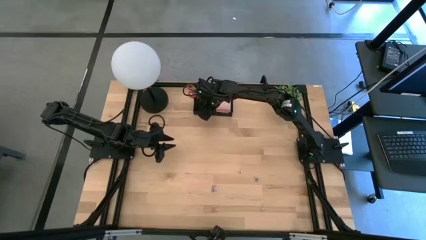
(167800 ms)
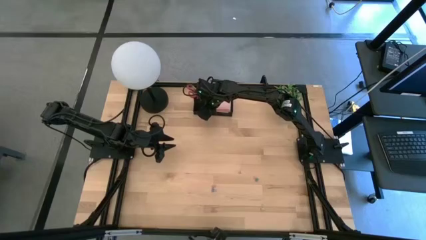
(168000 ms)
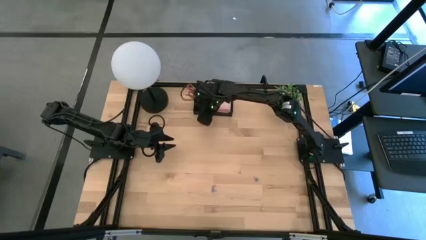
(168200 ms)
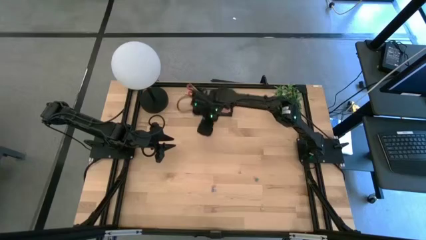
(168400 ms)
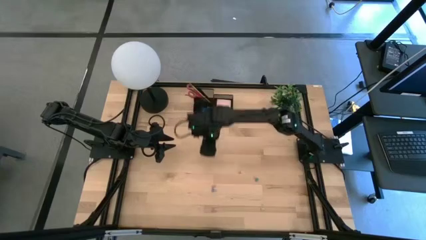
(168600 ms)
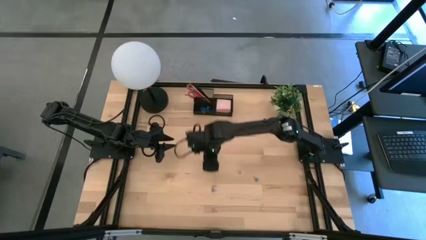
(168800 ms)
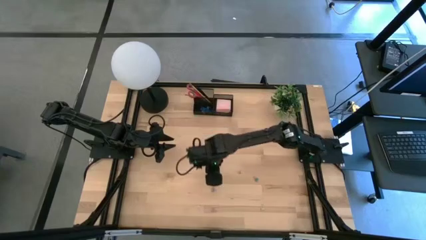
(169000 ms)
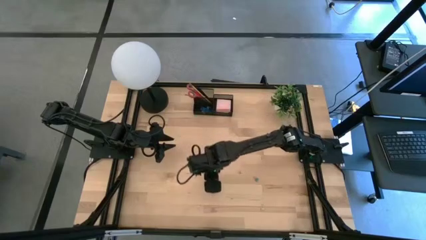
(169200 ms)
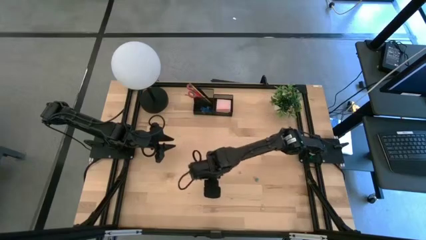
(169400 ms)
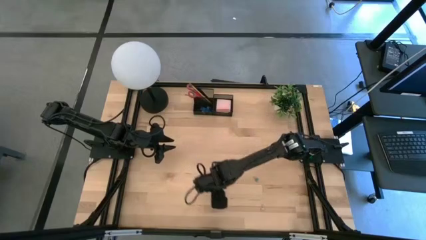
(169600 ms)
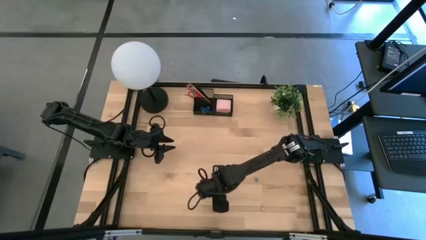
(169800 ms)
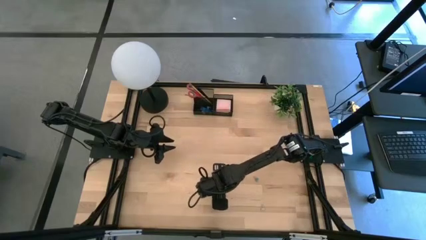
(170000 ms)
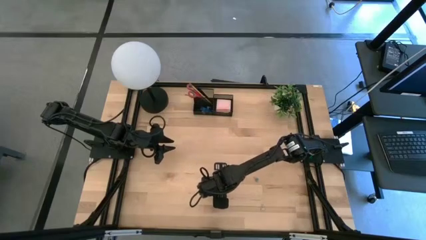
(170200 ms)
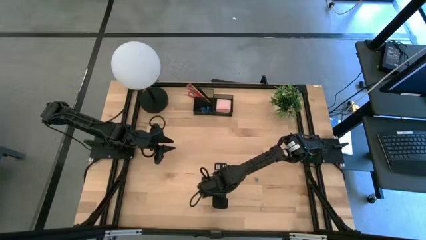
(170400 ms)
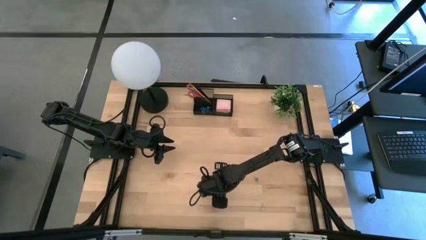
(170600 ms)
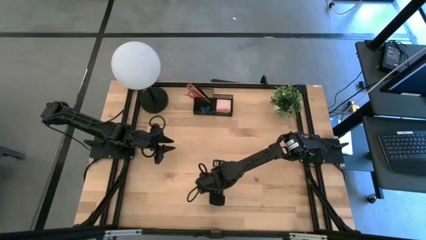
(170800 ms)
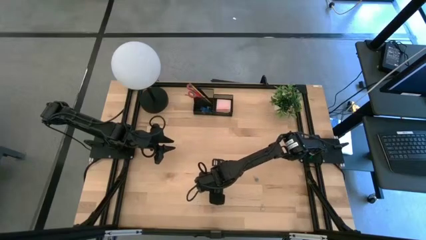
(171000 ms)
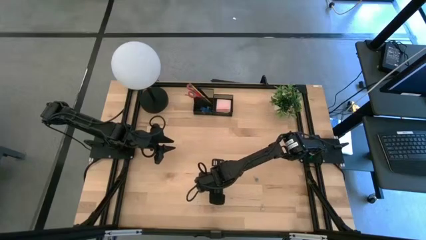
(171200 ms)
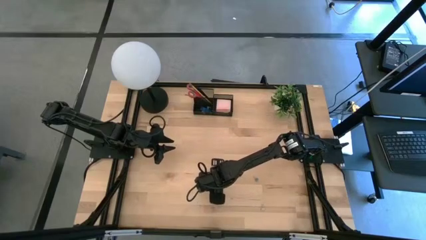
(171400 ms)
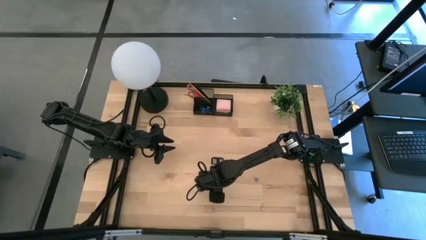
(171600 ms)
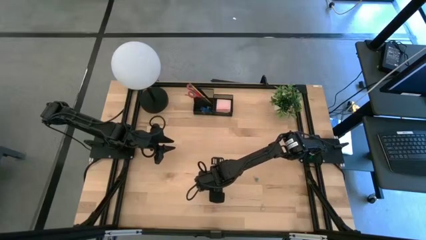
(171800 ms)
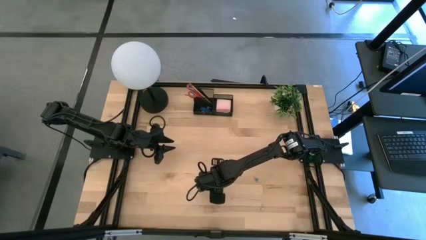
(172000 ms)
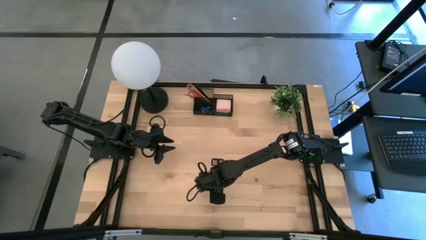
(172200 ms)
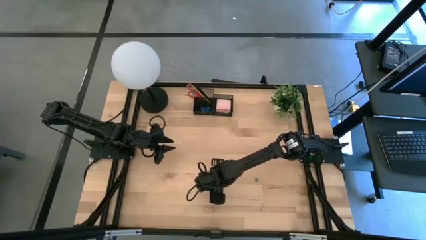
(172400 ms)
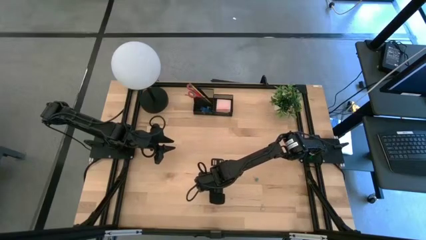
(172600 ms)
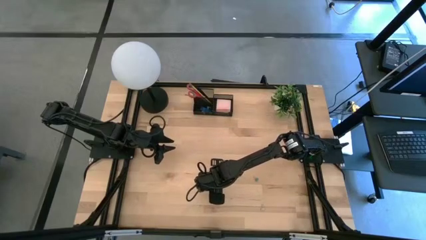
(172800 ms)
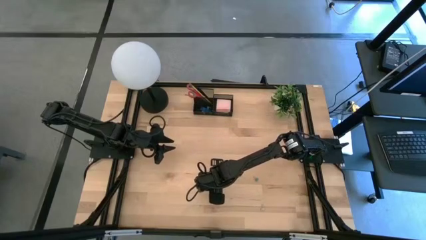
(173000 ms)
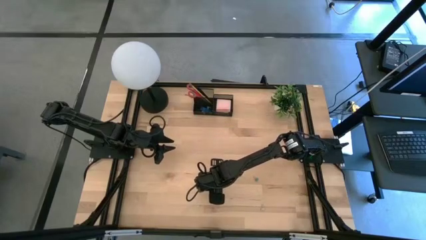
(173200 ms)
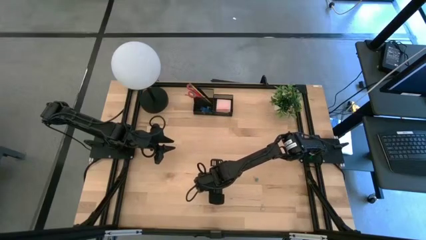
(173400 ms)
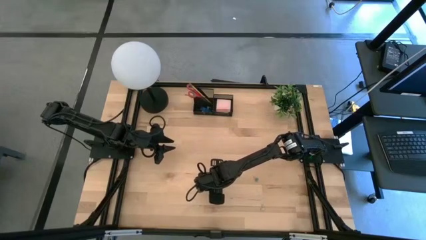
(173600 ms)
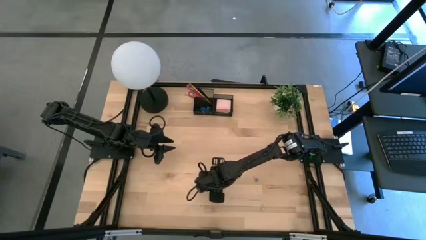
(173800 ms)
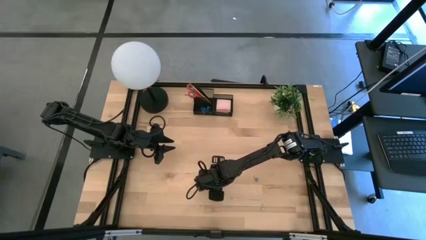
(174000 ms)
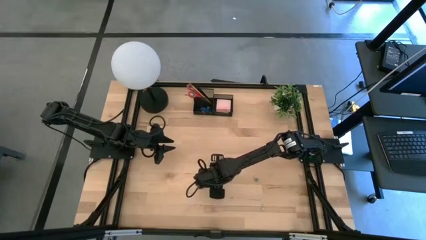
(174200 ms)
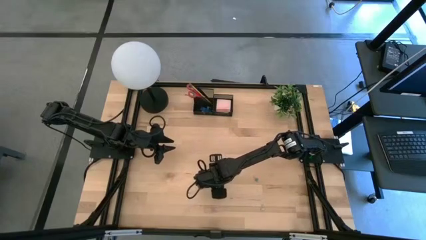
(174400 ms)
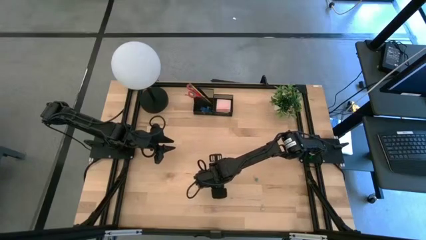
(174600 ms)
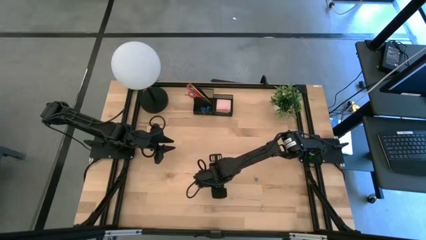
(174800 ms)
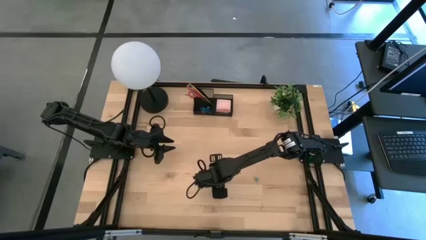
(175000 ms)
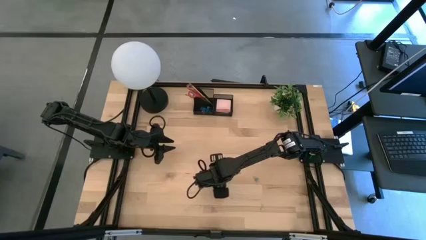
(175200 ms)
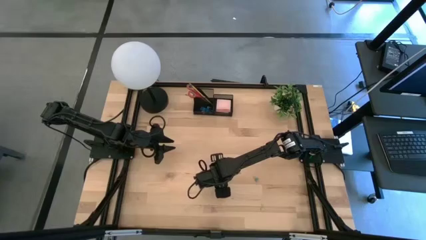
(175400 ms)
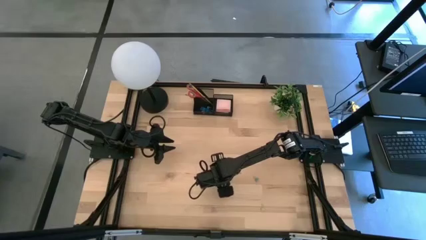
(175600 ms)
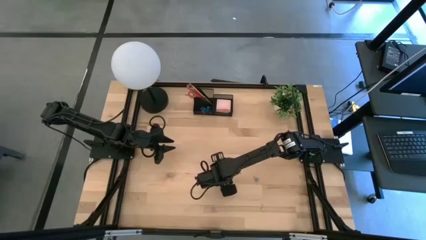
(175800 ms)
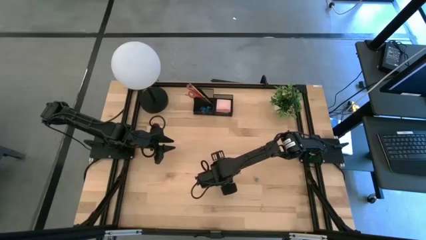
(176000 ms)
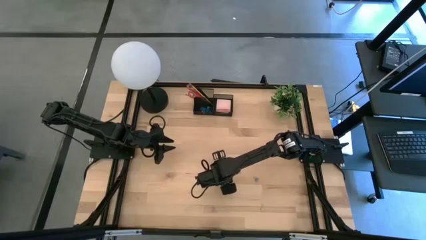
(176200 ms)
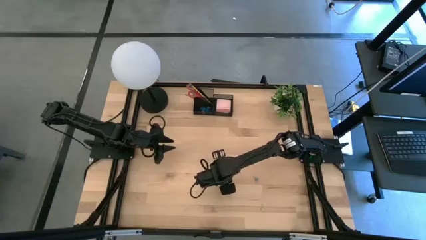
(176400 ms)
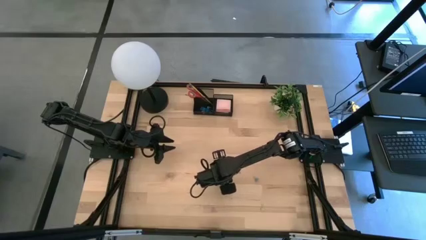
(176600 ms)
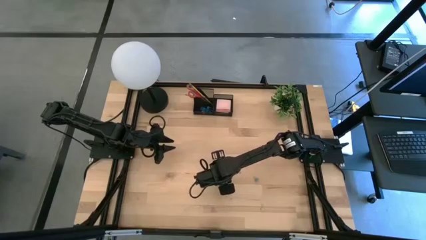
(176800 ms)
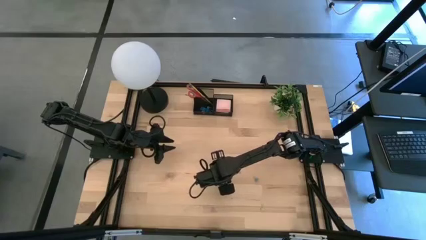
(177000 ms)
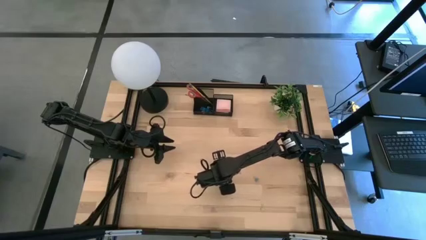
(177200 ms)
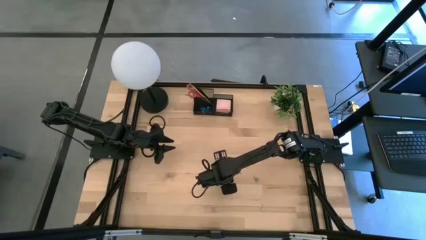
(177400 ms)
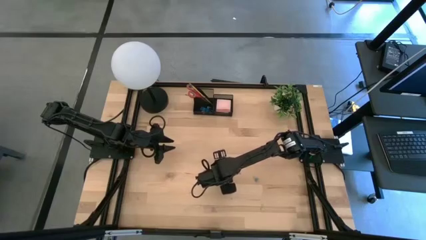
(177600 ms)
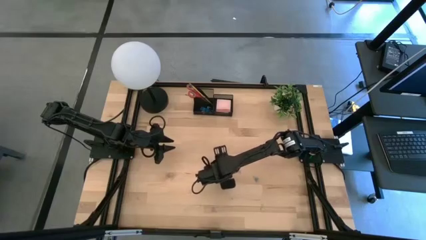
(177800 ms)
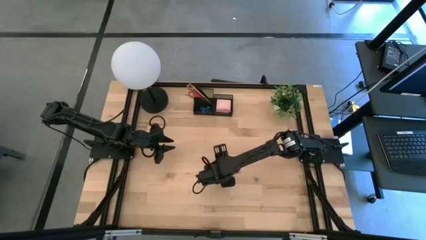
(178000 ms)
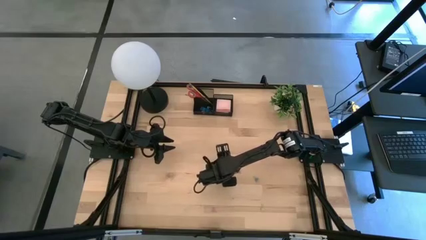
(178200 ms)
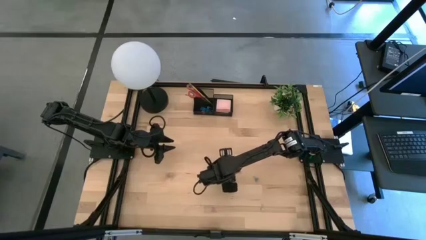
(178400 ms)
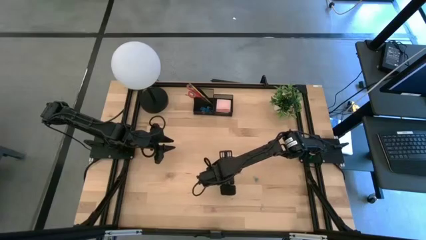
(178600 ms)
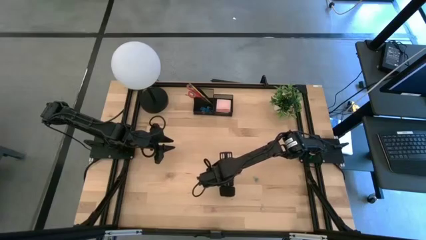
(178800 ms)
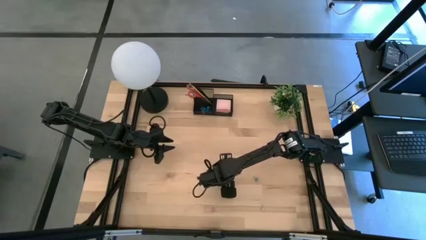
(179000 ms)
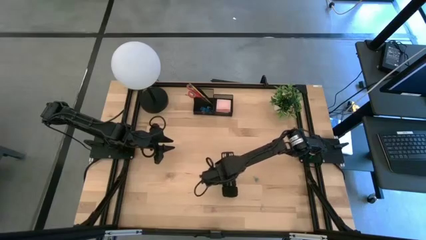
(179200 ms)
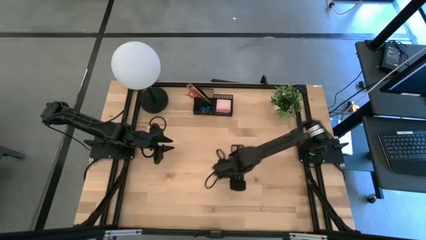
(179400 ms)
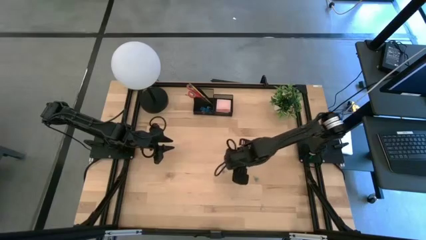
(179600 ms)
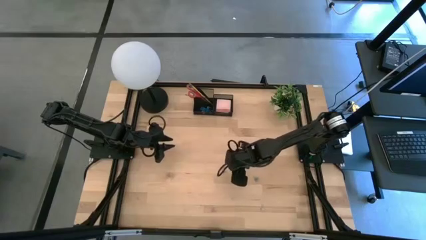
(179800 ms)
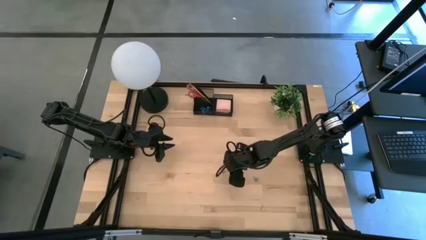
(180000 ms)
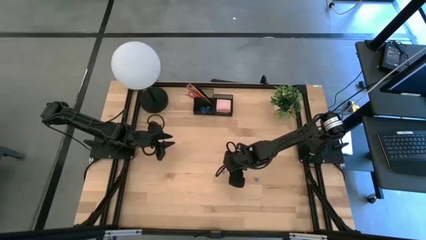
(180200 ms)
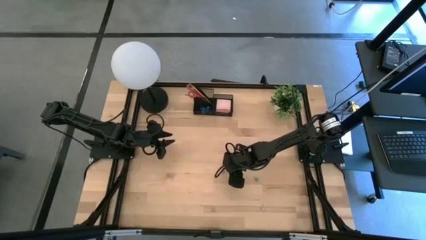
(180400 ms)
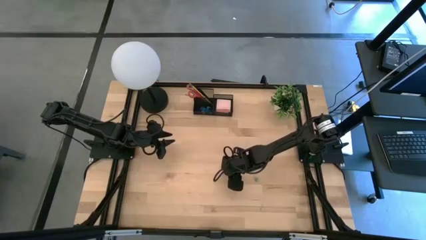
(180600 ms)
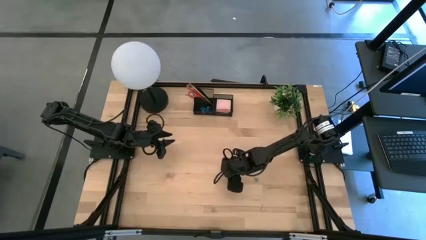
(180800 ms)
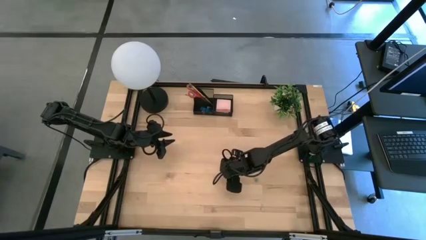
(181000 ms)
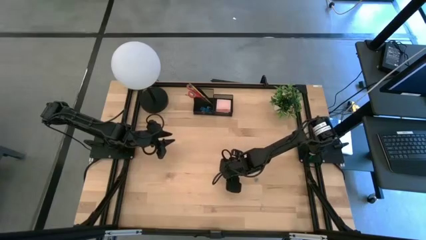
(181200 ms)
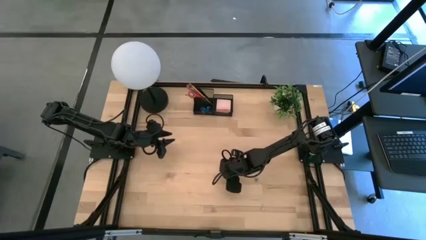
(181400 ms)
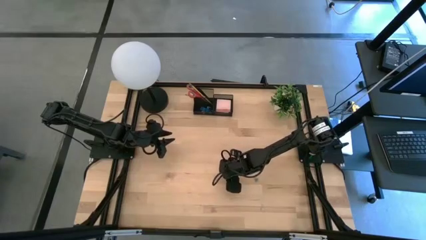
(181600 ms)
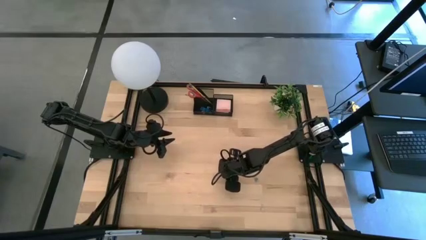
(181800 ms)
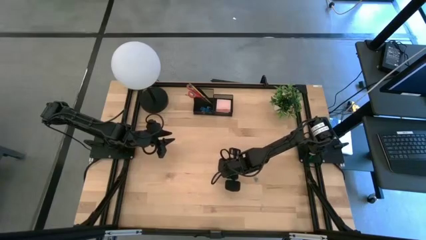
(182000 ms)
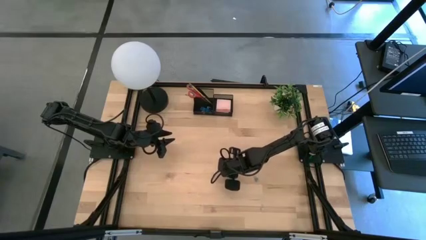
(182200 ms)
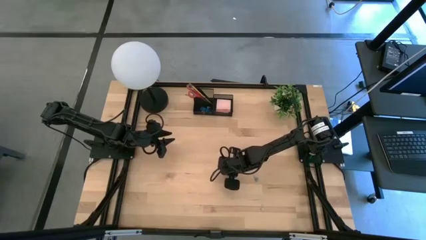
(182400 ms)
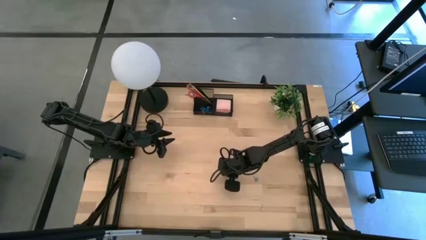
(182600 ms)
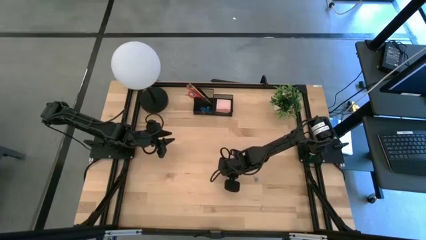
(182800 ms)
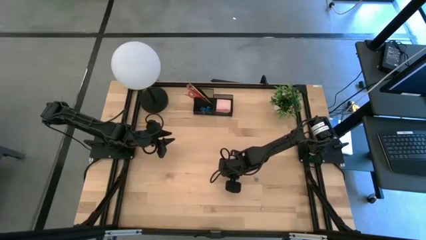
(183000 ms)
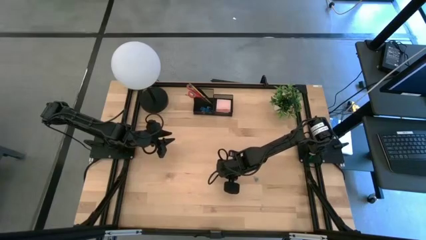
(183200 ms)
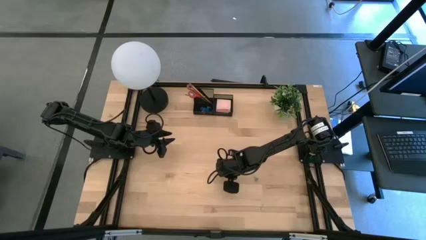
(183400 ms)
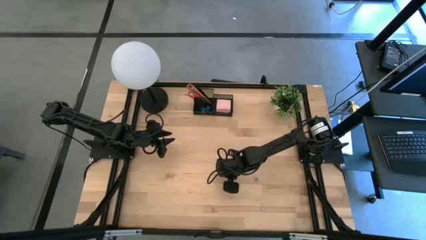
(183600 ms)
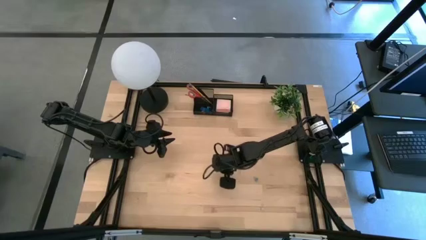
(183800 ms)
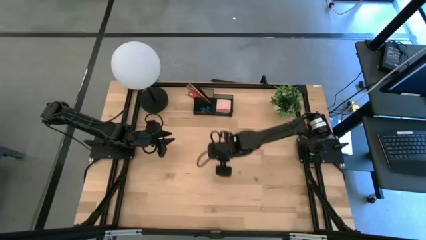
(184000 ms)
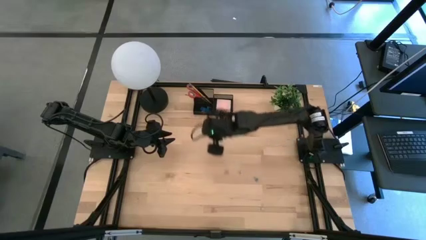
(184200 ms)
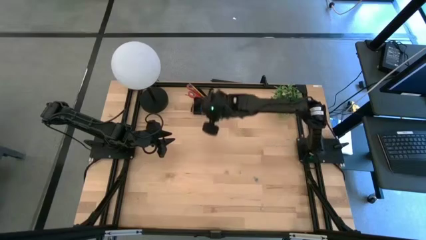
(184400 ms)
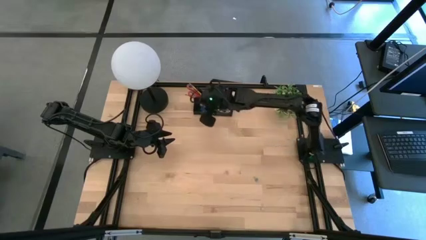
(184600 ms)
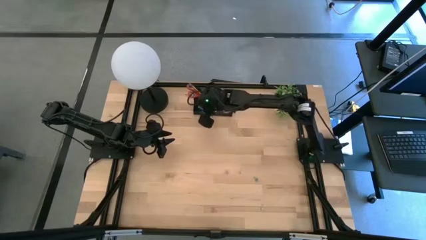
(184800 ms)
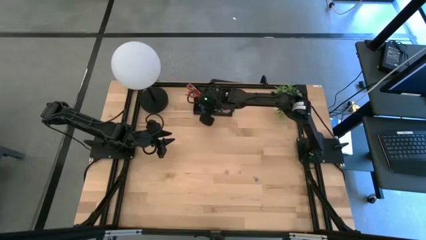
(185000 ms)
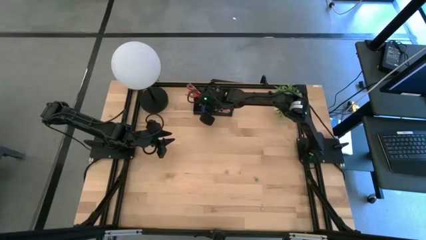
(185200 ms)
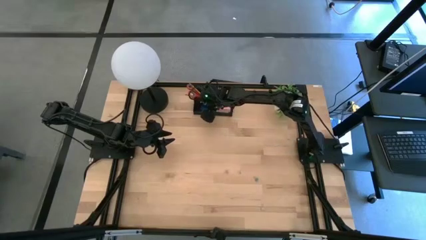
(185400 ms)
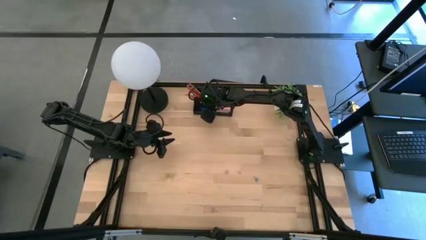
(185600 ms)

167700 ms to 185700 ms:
Task: Pick and place office supplies into organizer
Put the blue binder clip into the black desk organizer
